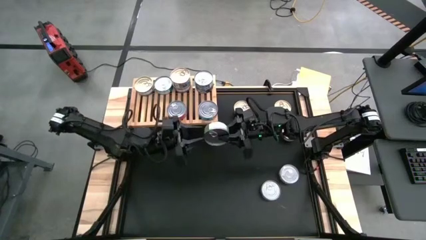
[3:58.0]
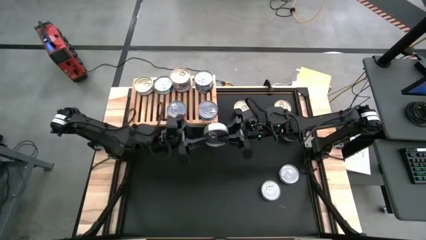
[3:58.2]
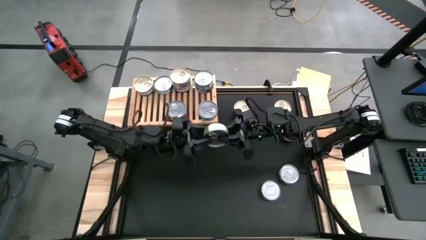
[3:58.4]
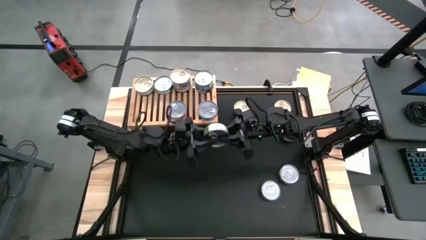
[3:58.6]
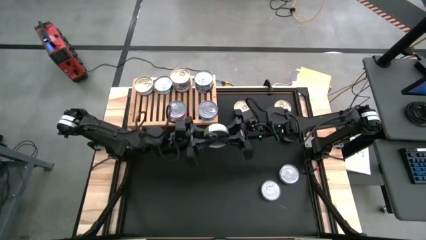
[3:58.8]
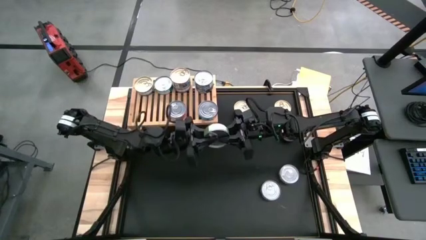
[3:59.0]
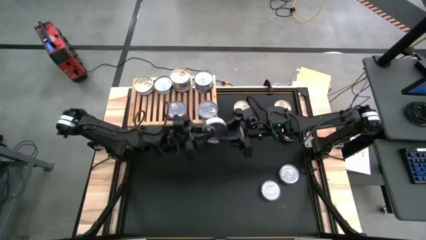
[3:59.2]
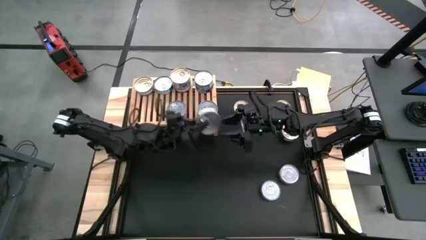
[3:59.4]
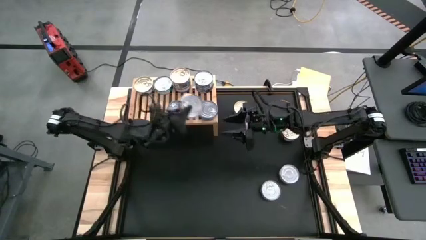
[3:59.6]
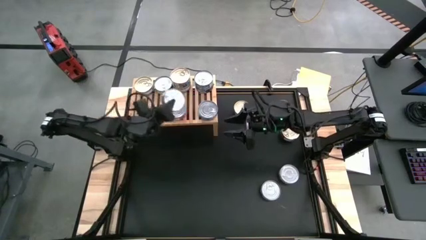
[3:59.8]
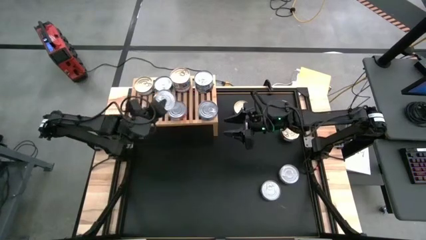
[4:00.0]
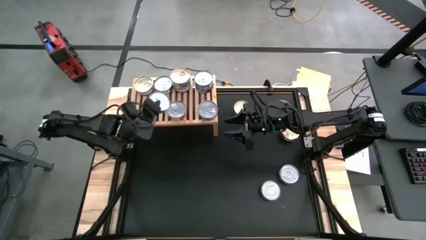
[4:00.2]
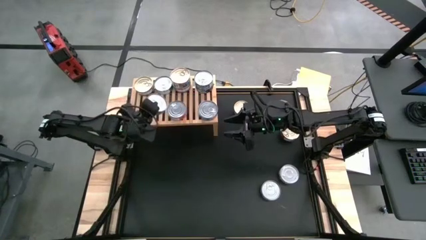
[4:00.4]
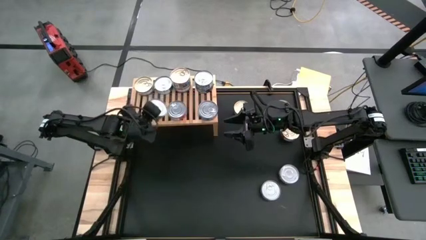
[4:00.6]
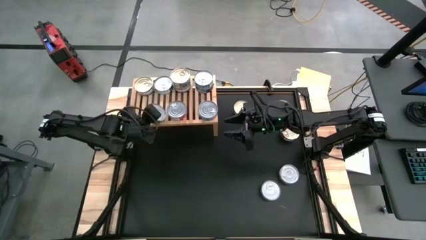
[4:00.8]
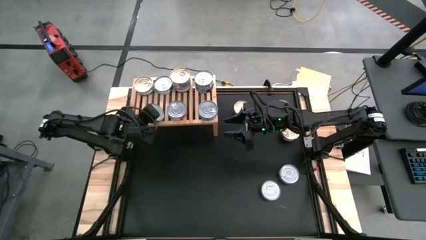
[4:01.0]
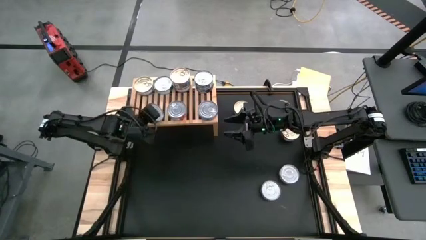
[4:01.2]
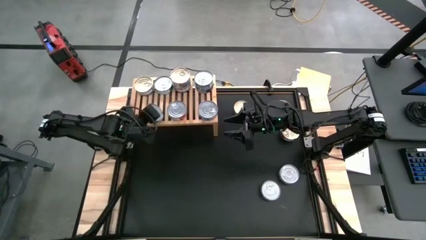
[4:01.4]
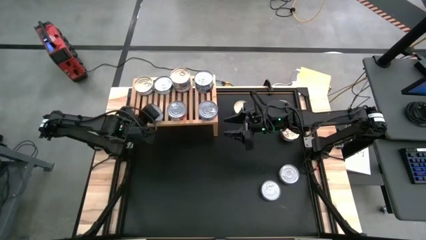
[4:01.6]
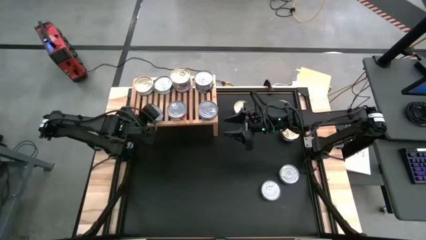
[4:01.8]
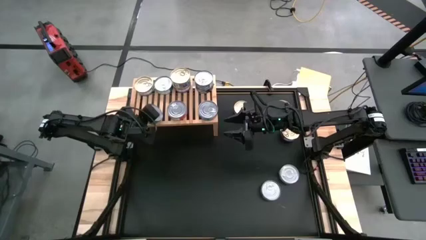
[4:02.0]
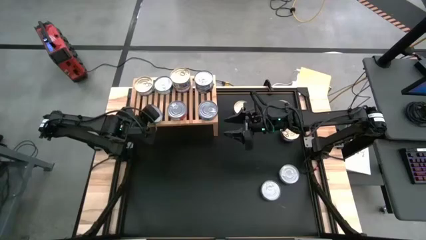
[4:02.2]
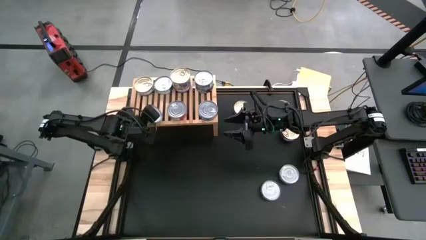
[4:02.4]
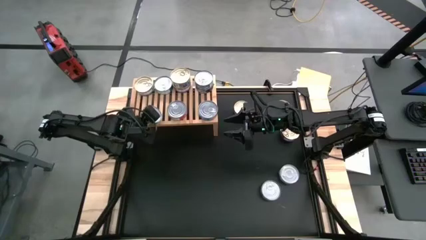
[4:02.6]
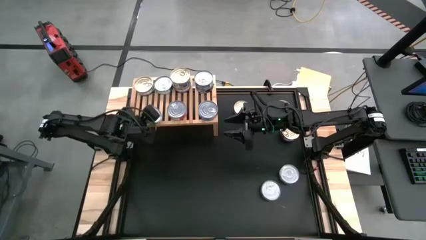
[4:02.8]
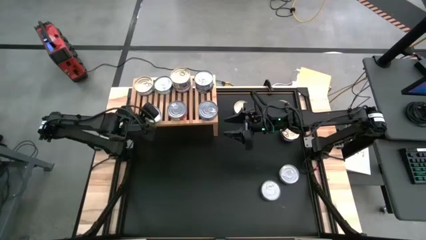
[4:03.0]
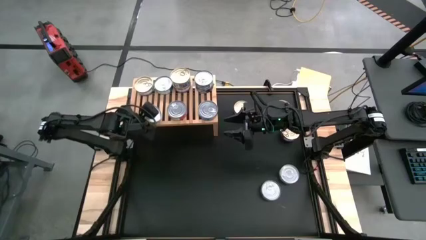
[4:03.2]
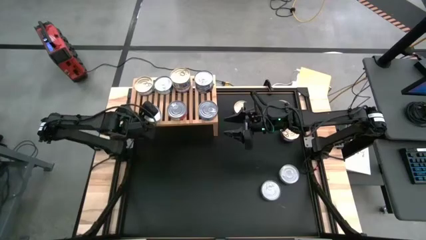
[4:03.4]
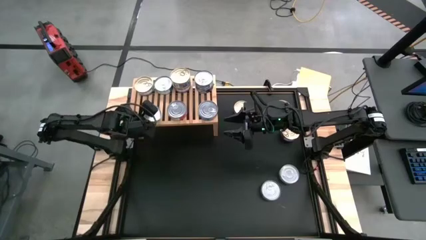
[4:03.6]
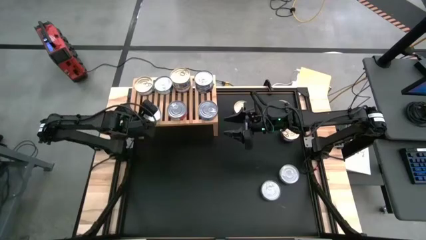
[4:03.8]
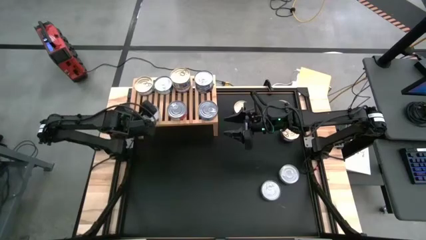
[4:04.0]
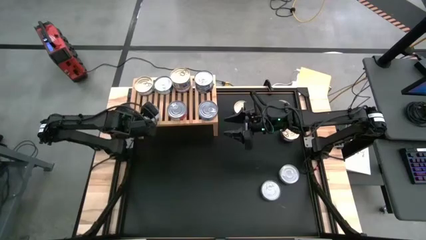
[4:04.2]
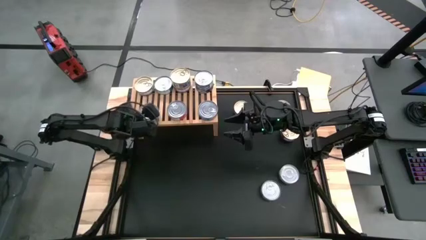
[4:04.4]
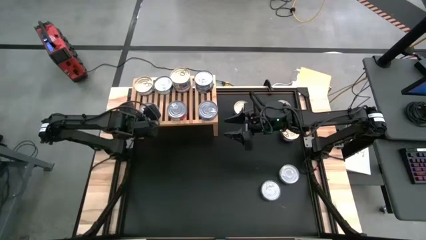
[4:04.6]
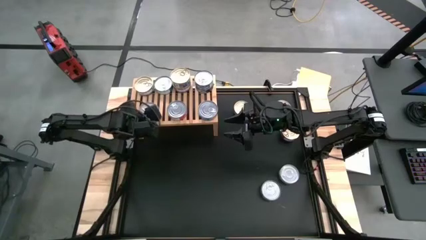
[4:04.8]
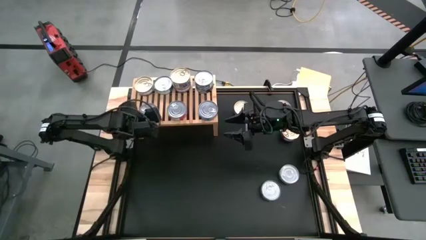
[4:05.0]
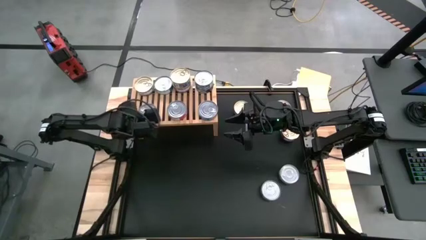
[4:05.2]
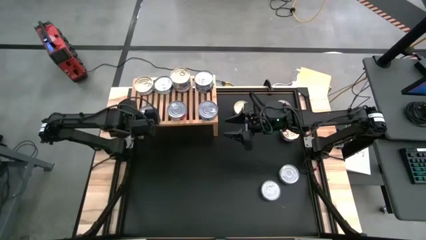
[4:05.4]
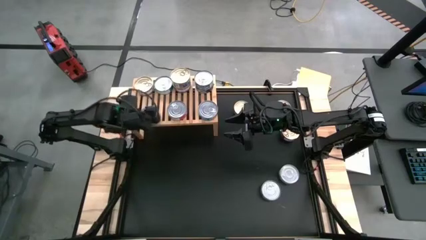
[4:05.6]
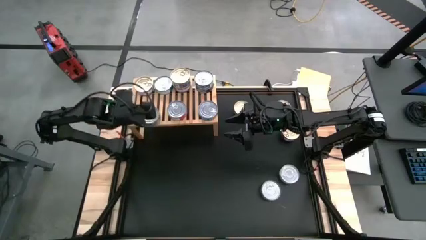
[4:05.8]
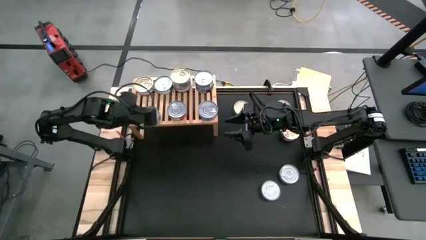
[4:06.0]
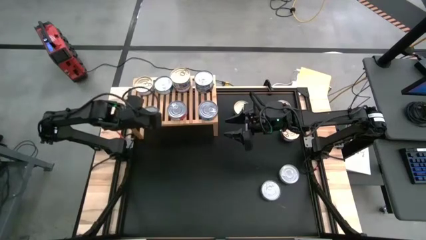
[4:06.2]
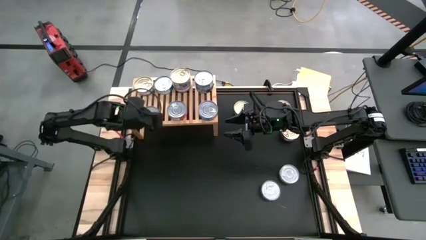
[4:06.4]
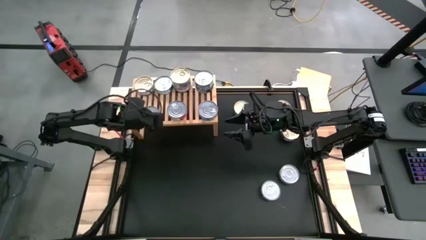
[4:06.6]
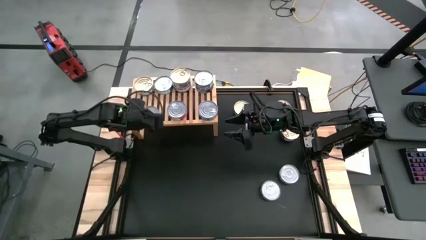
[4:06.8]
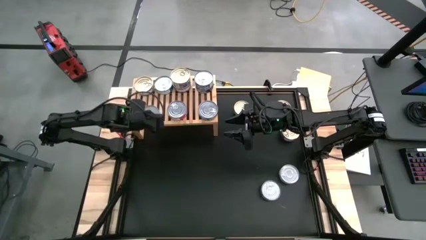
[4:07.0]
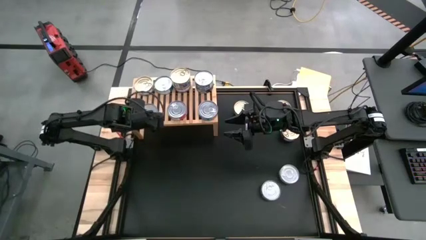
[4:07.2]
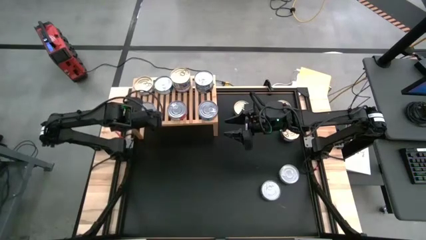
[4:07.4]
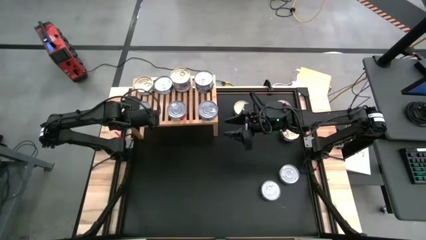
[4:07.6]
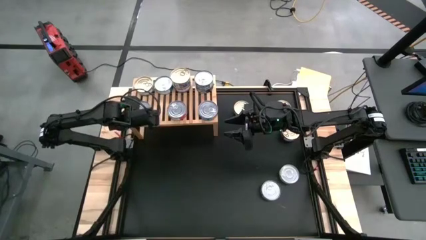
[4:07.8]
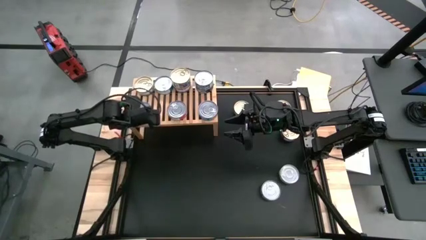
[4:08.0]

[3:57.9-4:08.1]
Task: Stack canned seafood by type on shelf
Put the left green tuna can on the shelf
